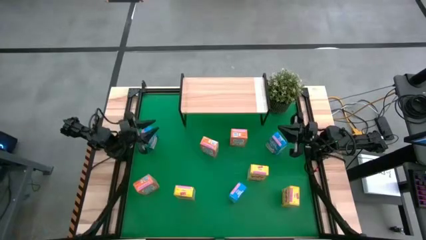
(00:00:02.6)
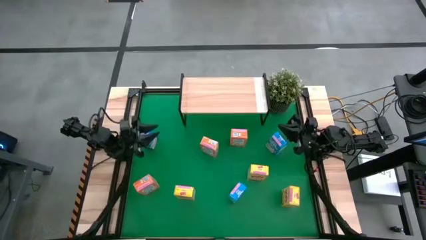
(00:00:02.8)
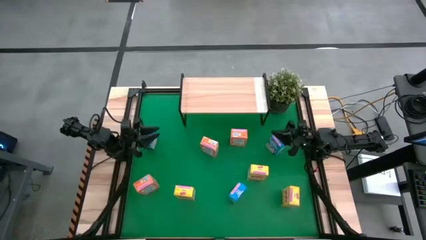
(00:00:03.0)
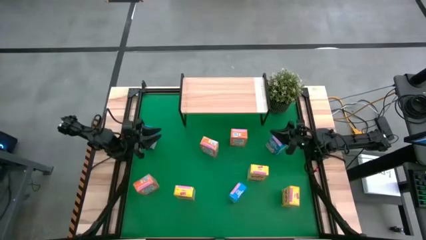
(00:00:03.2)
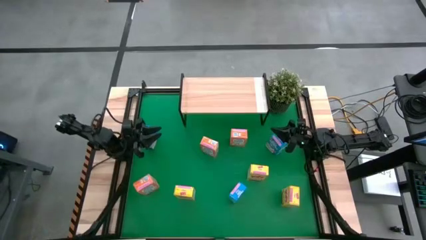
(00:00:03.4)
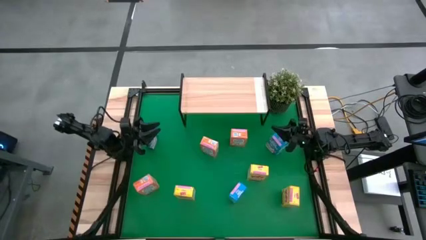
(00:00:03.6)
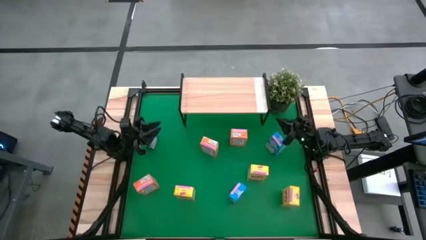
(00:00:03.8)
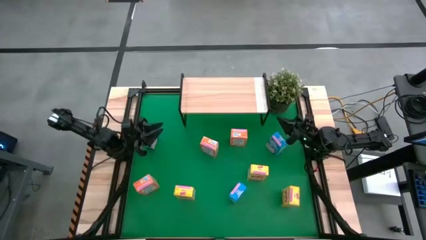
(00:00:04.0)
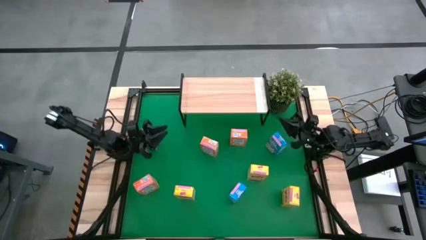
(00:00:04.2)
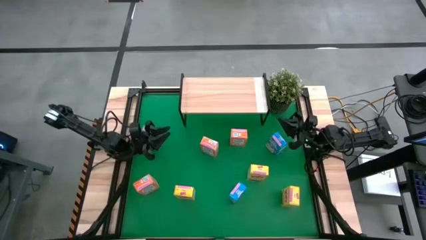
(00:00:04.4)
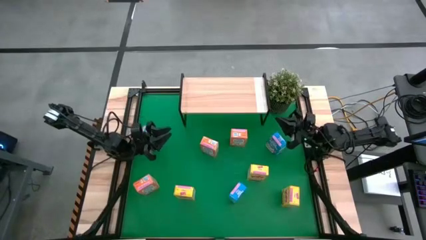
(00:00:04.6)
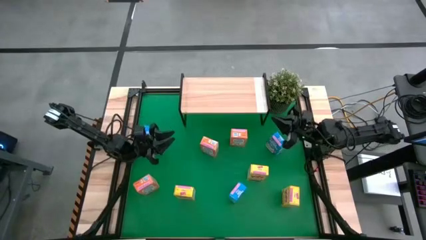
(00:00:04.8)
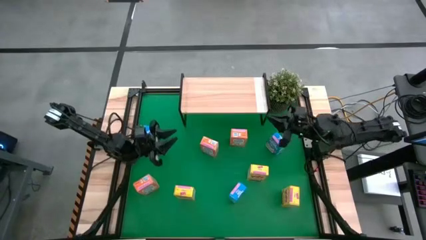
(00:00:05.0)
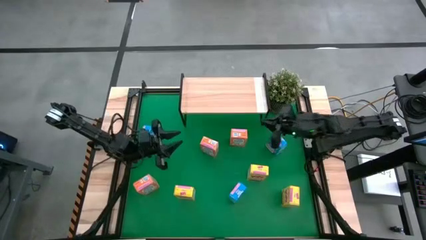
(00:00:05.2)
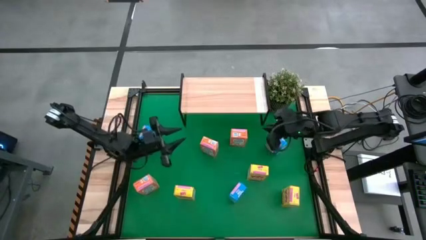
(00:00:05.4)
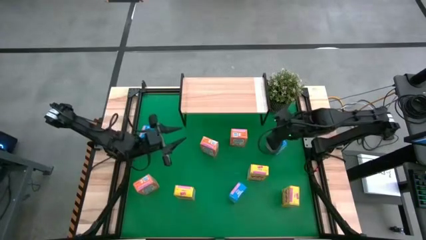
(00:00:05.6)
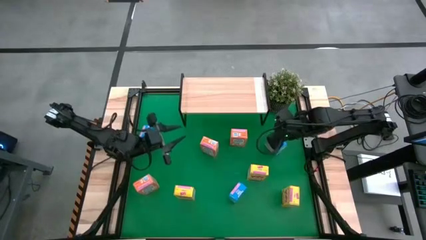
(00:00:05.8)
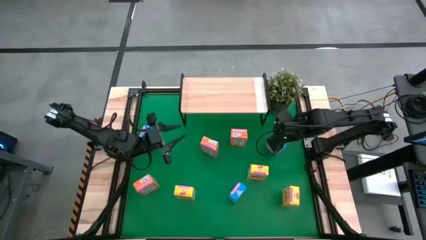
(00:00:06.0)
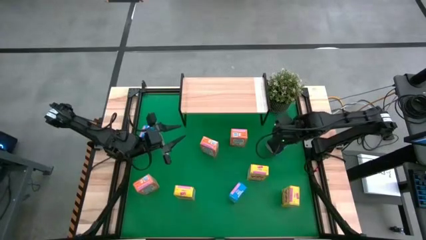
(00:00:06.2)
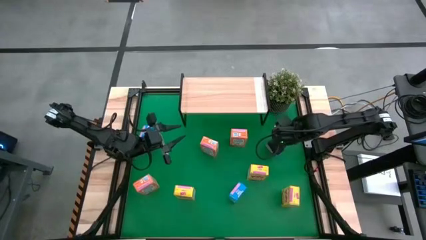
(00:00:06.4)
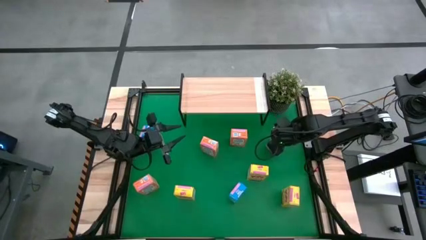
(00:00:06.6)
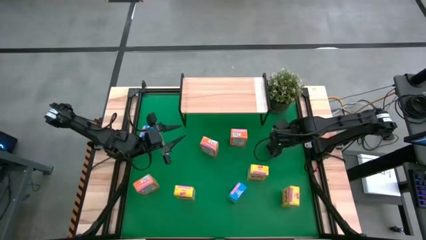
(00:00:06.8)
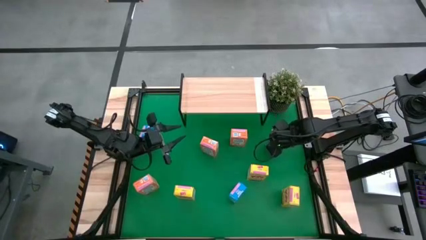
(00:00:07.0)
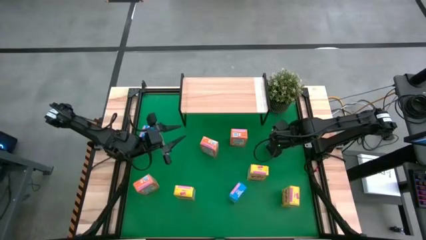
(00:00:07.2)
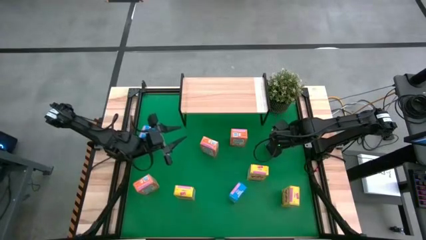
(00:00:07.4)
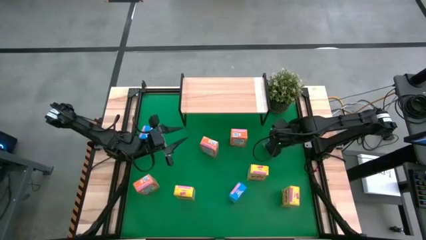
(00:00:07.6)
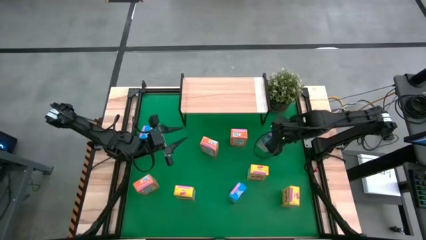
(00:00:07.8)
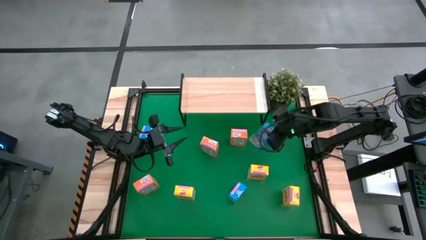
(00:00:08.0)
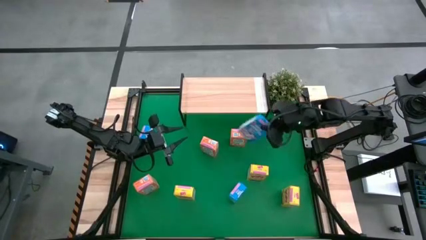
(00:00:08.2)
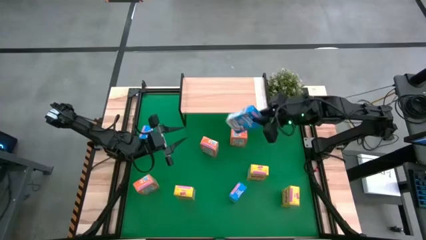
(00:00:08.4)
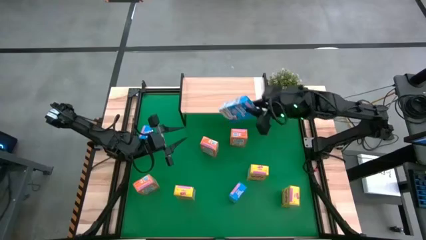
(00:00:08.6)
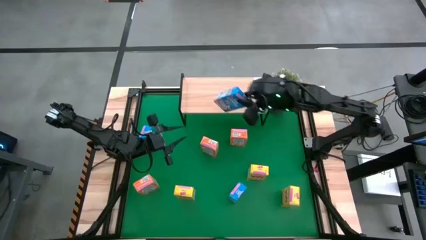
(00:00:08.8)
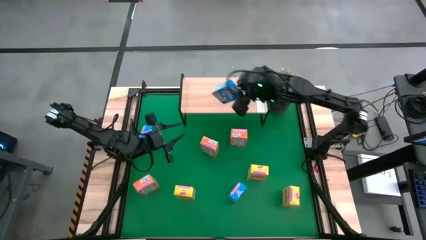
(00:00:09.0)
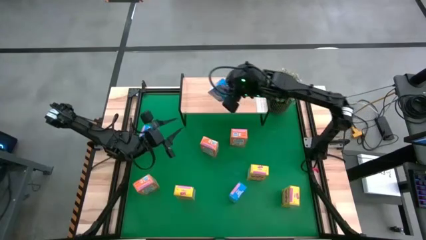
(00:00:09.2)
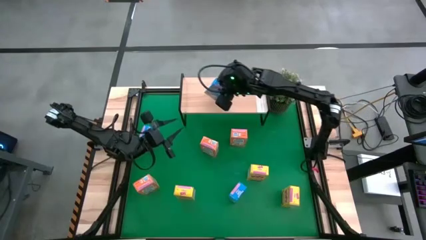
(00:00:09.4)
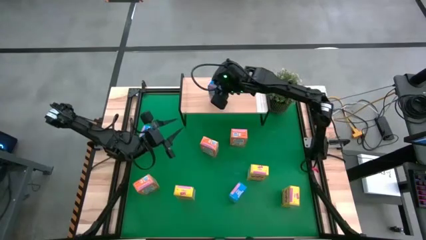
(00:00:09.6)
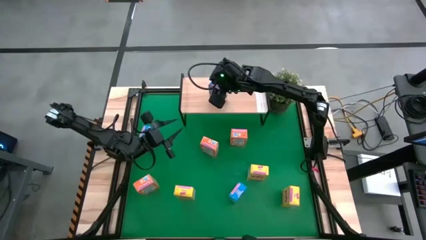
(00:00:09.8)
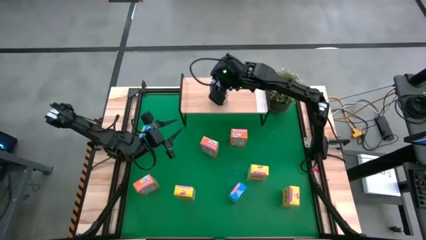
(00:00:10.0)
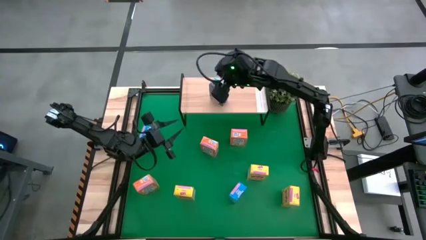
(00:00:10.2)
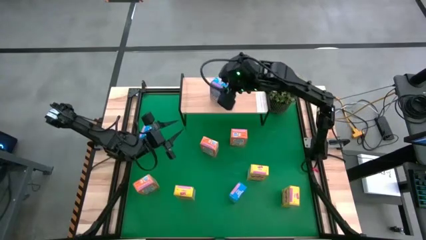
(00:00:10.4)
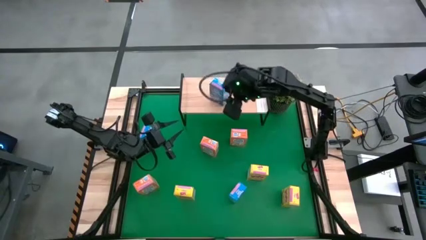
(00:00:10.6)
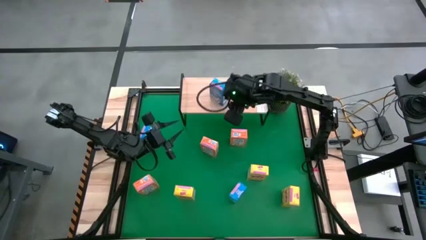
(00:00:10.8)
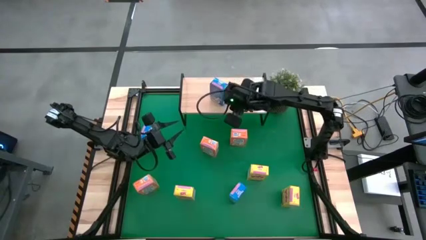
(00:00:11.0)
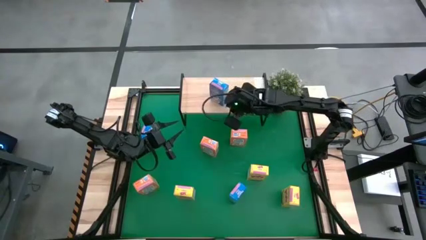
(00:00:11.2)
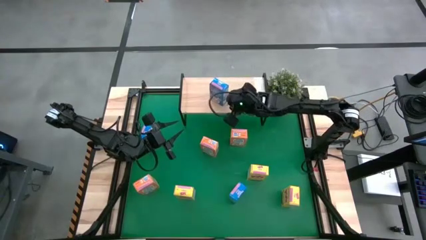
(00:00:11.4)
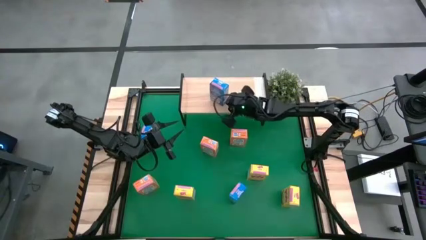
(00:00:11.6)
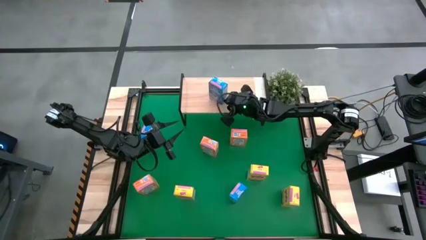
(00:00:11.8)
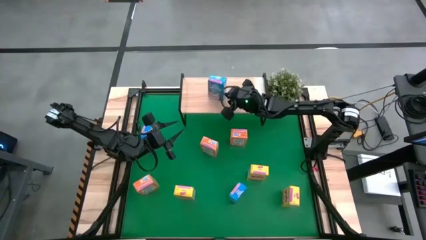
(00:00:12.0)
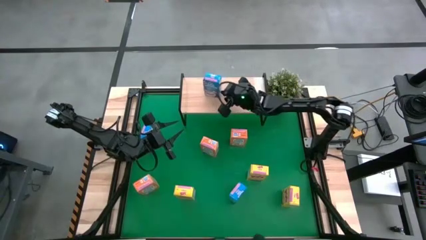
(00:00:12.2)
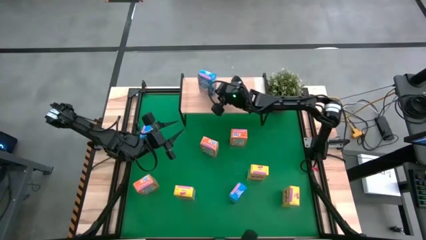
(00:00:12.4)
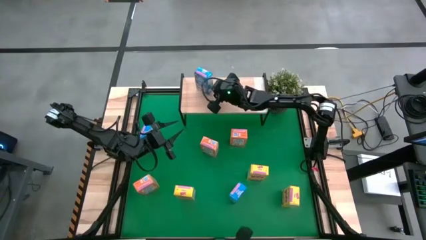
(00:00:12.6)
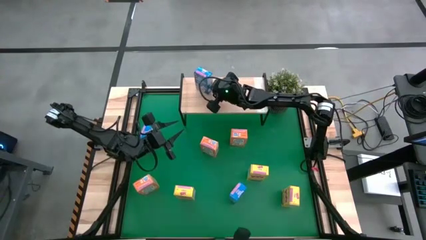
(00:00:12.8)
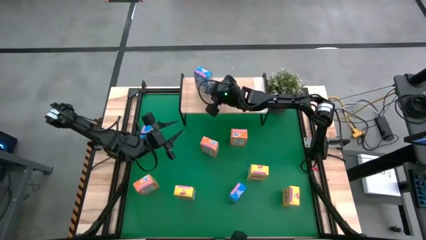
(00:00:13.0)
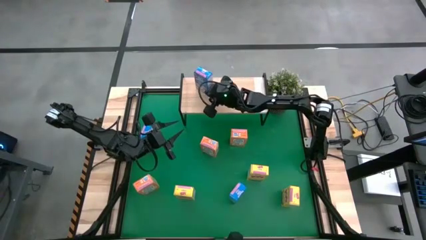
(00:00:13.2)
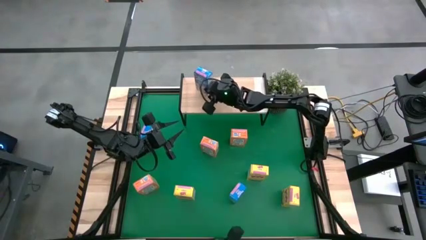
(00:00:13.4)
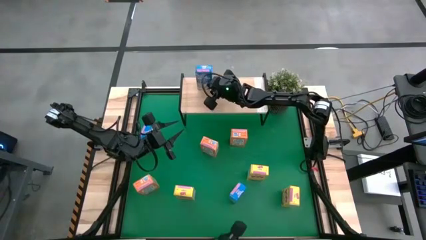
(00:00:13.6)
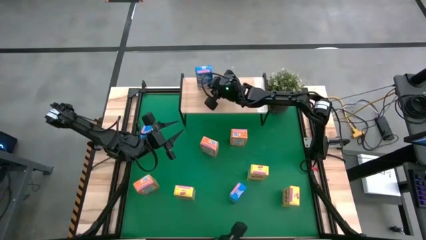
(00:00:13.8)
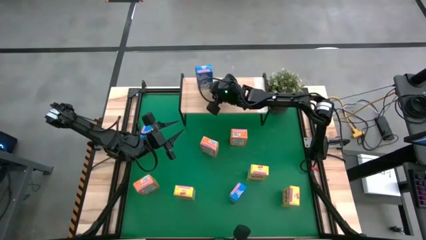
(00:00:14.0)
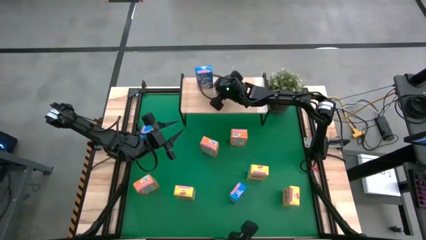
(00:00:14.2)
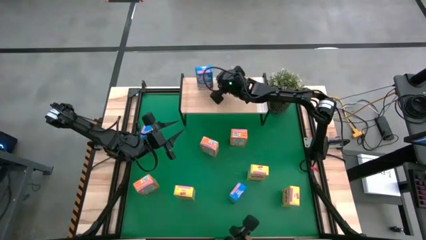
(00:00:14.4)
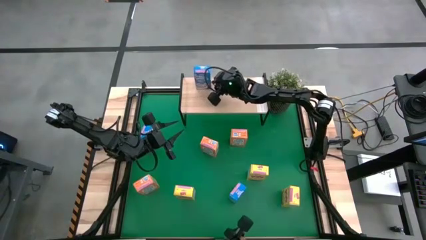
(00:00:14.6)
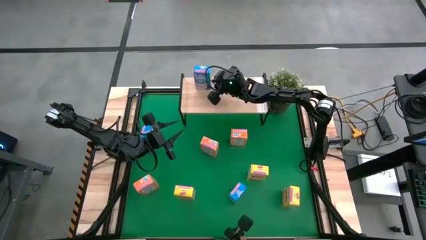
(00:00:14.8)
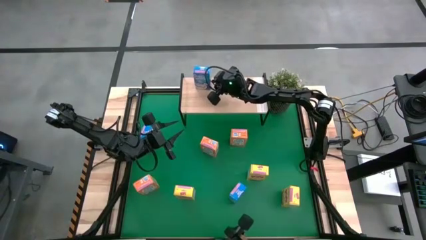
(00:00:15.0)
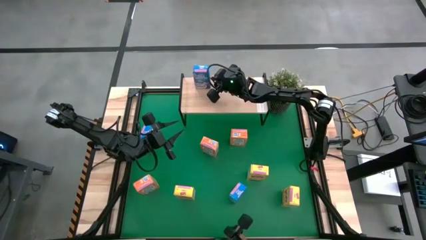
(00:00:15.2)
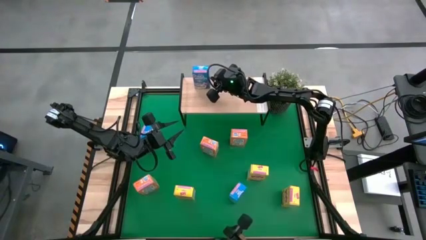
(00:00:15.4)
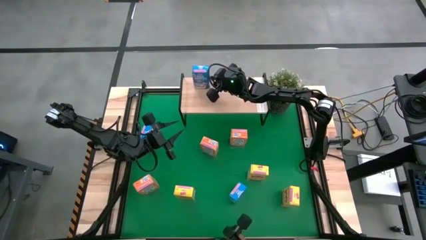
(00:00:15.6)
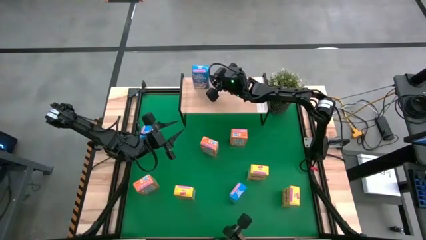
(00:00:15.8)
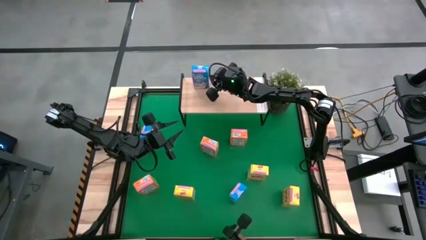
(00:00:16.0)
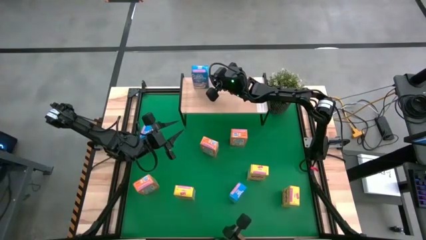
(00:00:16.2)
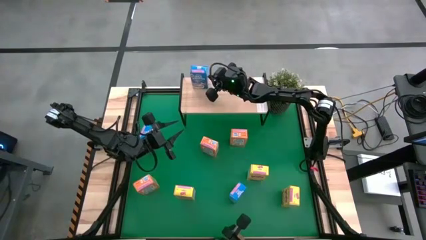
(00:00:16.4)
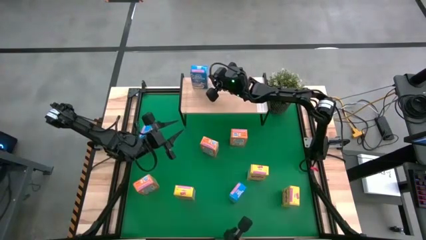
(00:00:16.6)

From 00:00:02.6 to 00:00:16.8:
Task: Stack cereal on shelf
Put the top right blue cereal box on the shelf

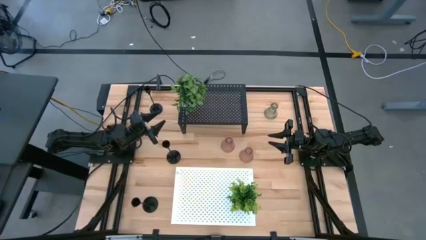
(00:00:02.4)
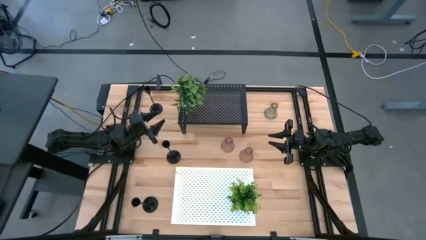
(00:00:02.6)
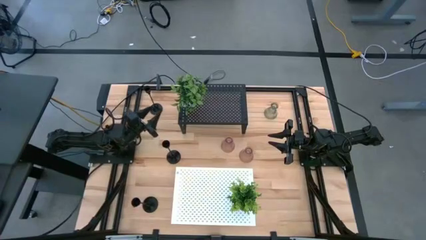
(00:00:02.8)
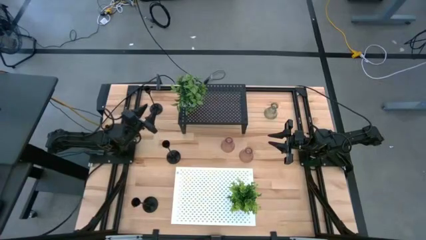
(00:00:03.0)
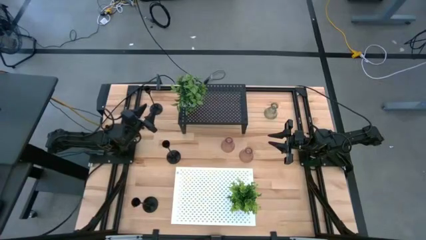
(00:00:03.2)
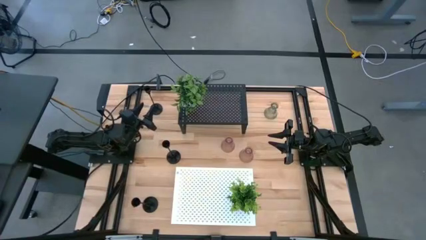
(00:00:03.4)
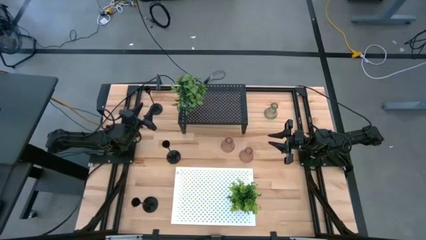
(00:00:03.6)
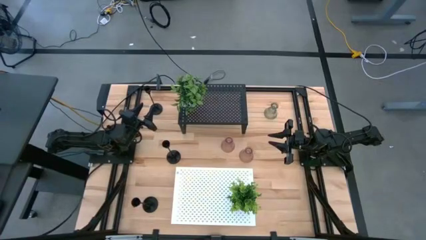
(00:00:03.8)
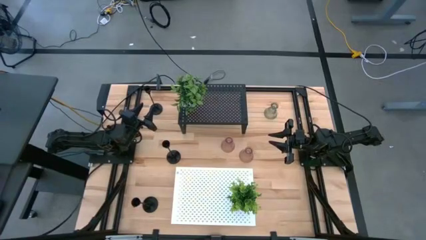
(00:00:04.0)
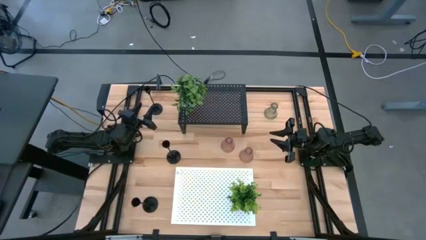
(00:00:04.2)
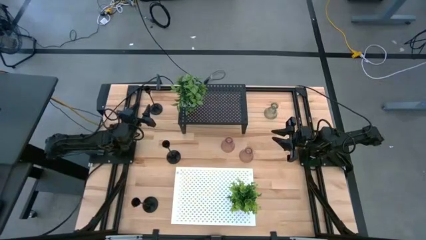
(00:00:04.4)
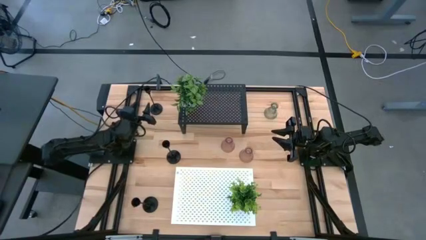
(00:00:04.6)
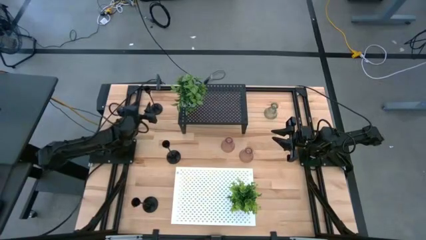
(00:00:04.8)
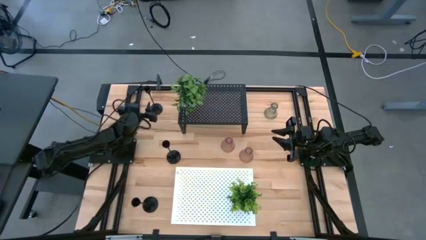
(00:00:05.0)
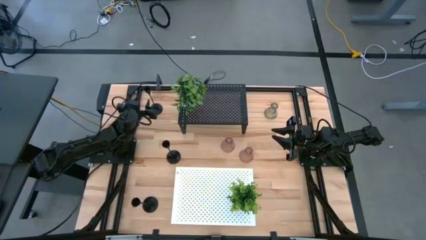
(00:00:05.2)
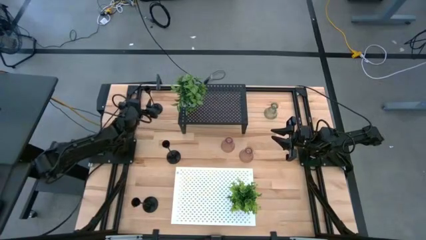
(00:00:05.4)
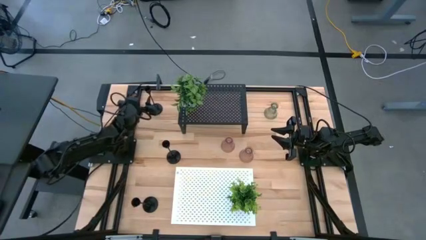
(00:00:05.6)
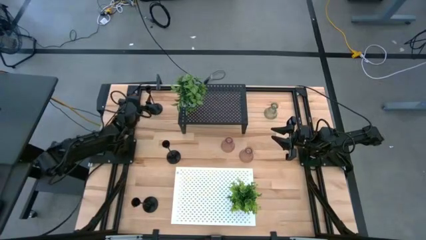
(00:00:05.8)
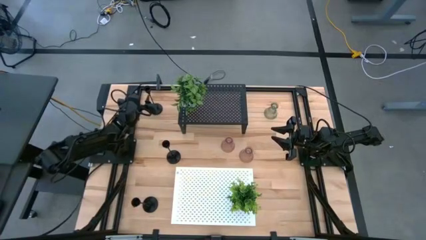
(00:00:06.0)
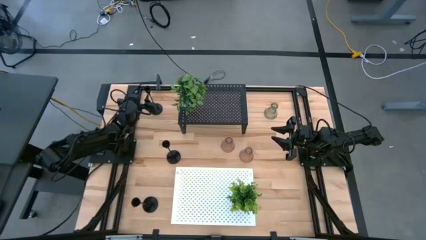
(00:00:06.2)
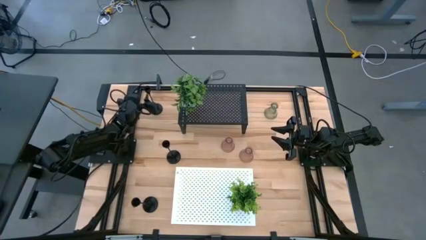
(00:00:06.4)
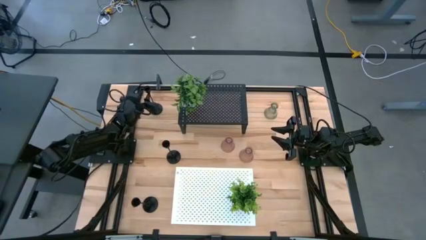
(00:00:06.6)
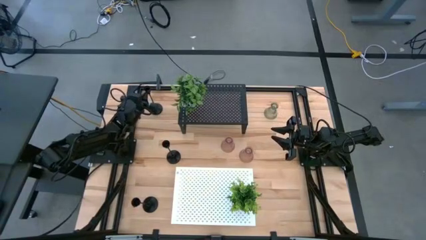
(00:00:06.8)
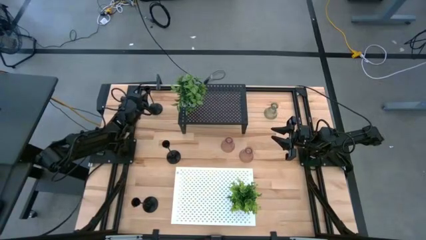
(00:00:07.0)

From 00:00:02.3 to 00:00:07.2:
Task: Pick & Place candle stick holders
Put the big black candle holder on the black shelf
